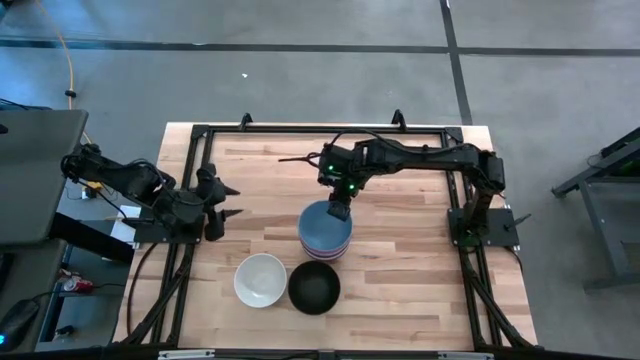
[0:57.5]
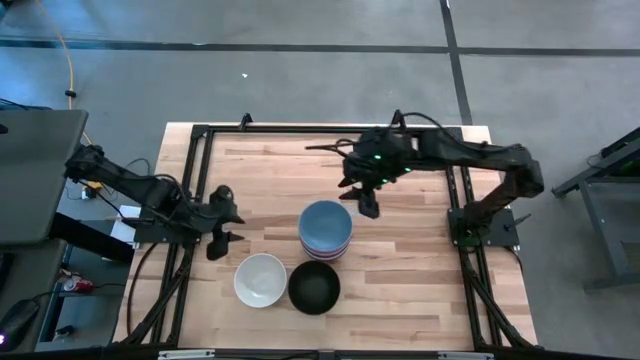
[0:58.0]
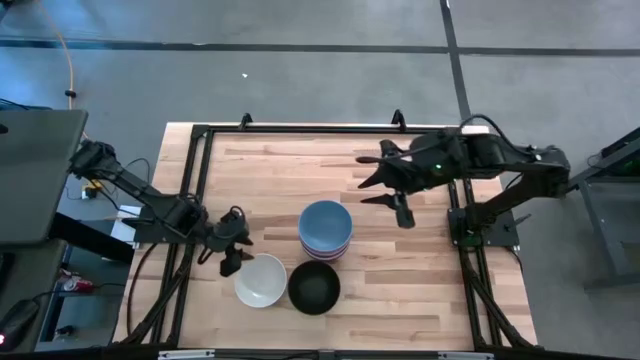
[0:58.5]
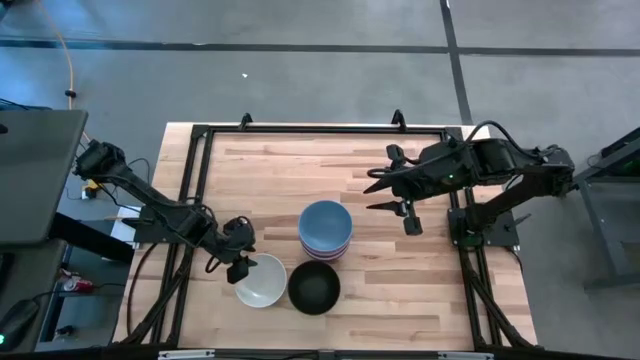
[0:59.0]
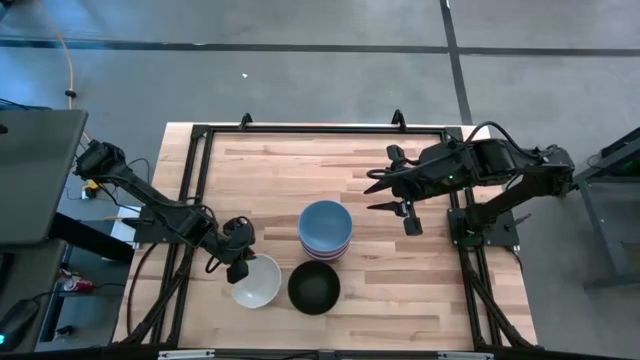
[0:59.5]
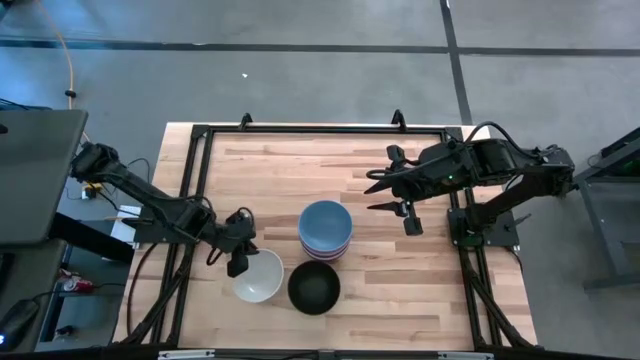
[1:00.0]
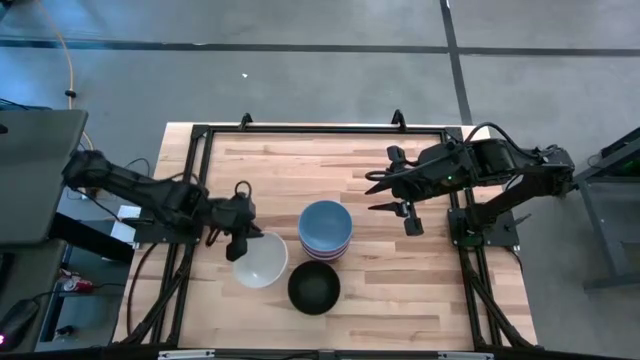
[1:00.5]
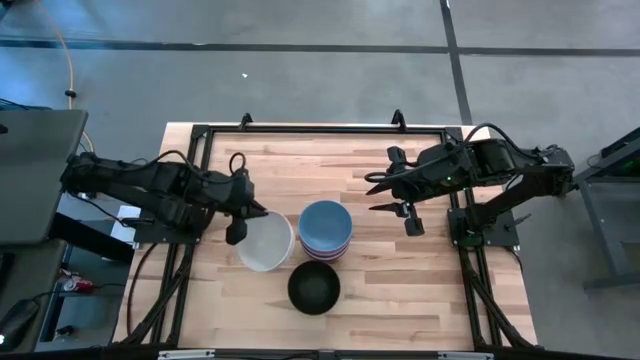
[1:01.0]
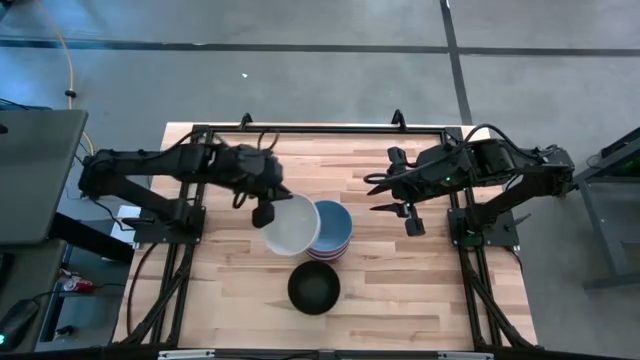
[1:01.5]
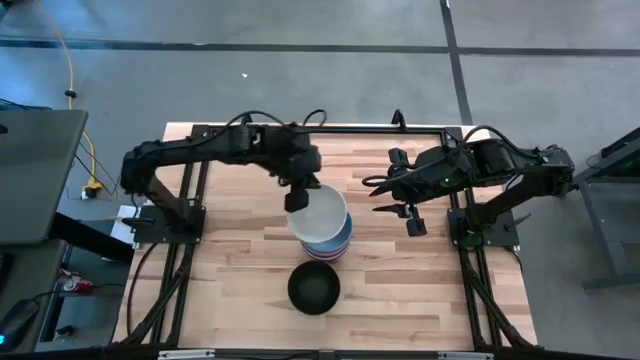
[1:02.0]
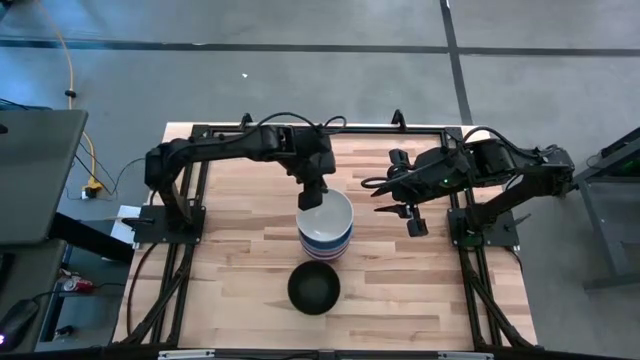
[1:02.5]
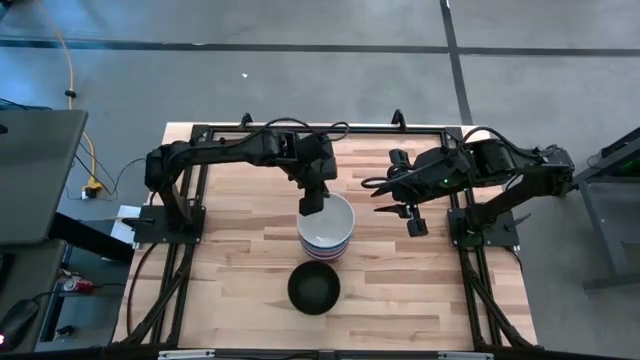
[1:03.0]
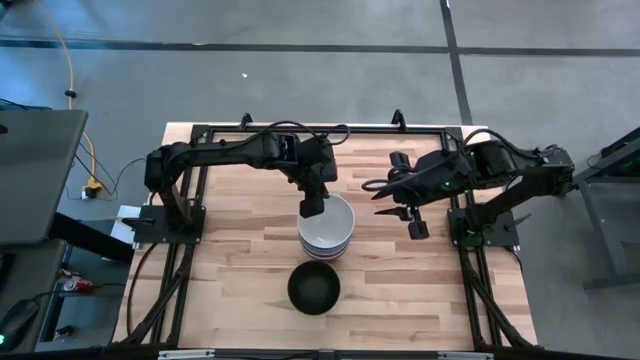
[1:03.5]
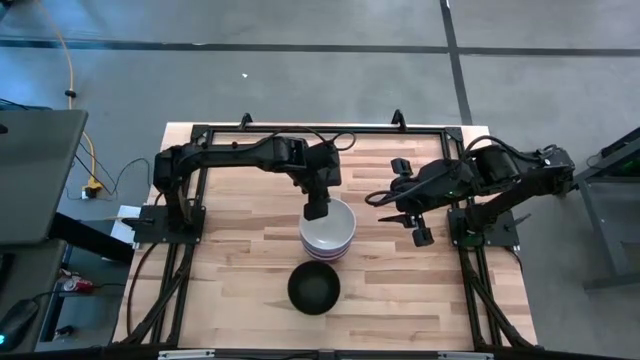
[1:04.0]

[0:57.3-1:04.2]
Task: Nest bowls inside each other
Stack the white bowl on top of the blue bowl

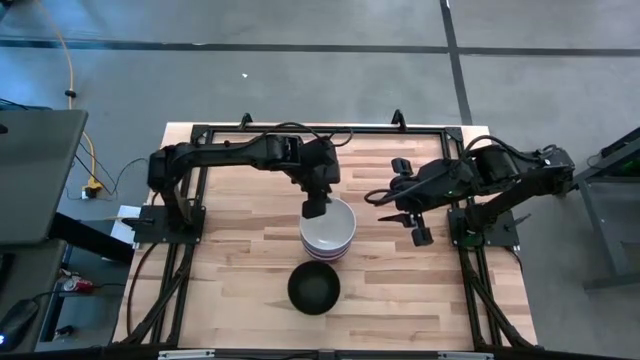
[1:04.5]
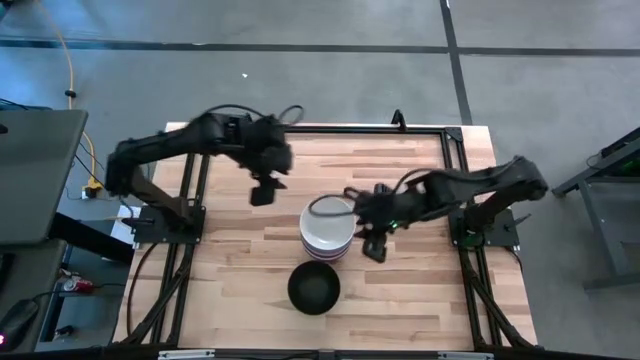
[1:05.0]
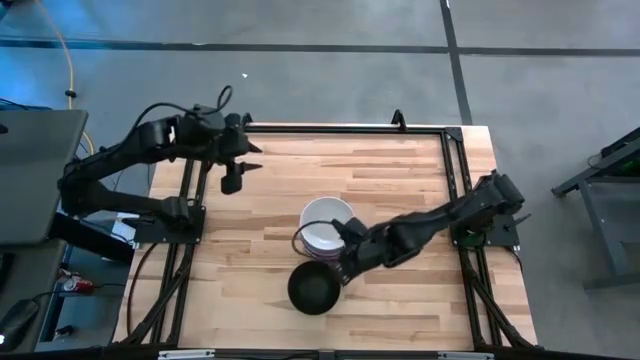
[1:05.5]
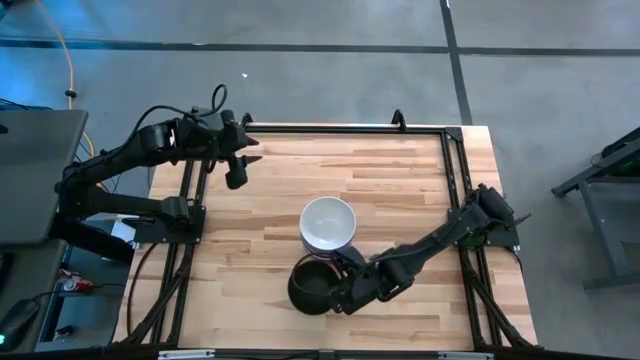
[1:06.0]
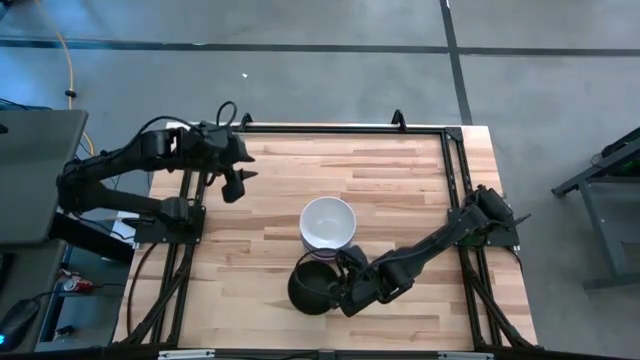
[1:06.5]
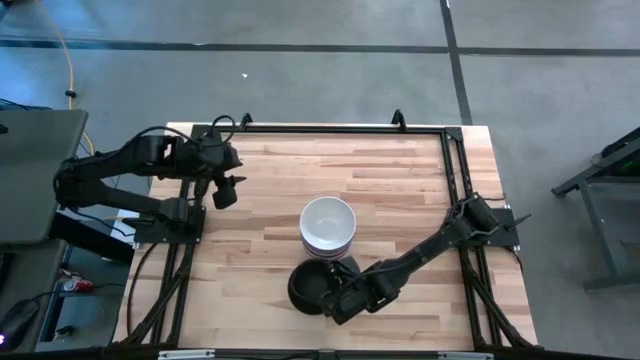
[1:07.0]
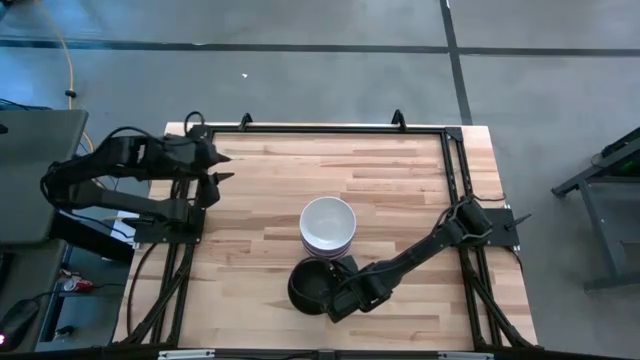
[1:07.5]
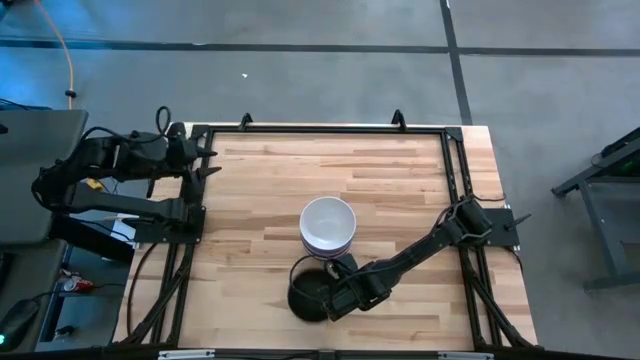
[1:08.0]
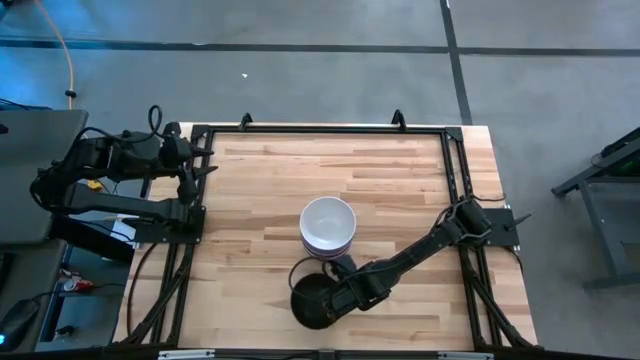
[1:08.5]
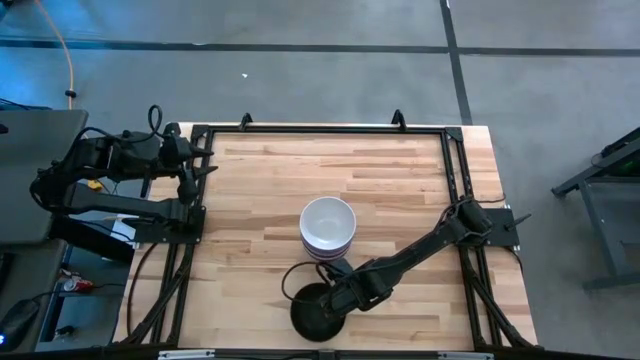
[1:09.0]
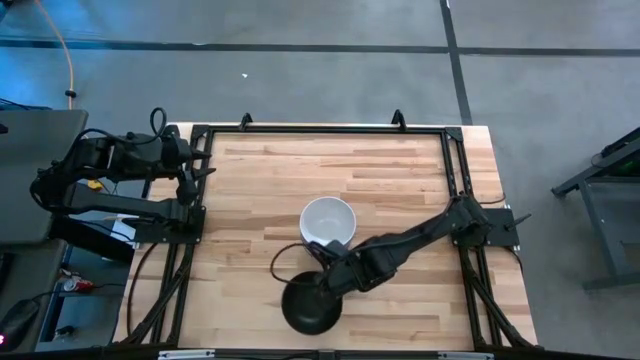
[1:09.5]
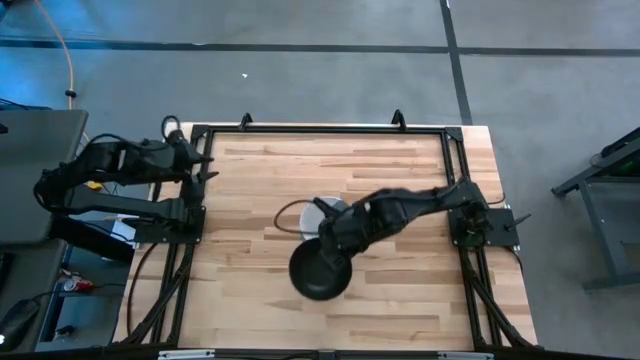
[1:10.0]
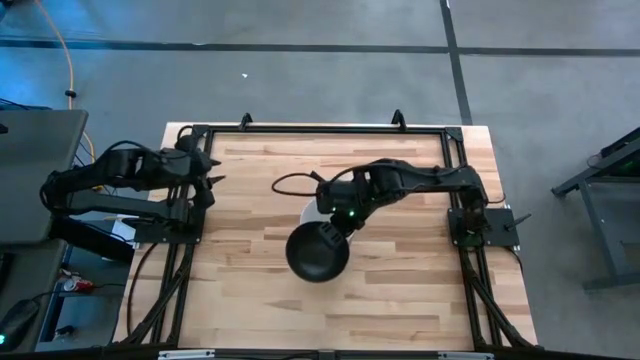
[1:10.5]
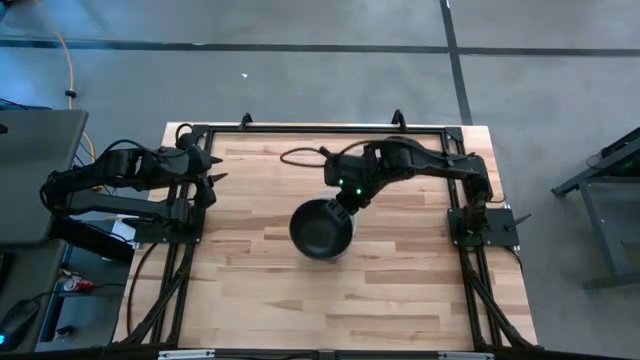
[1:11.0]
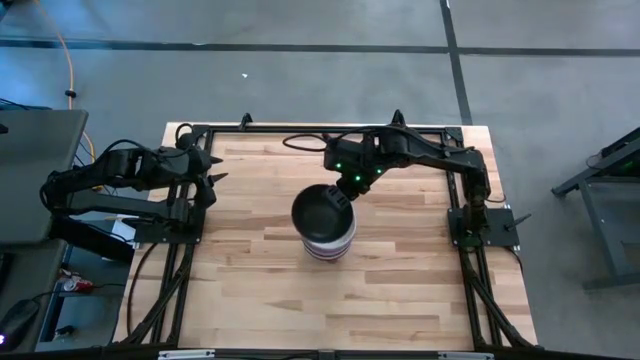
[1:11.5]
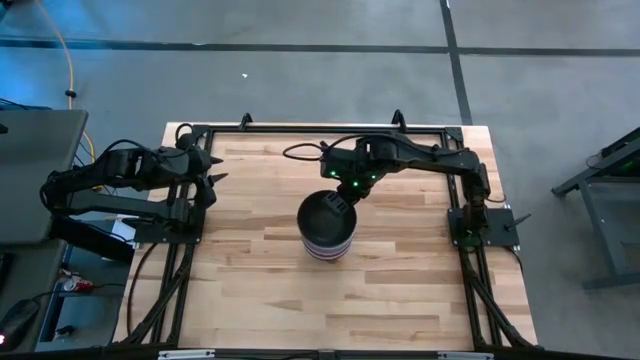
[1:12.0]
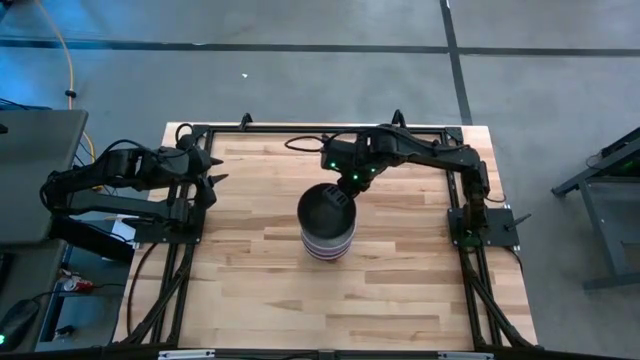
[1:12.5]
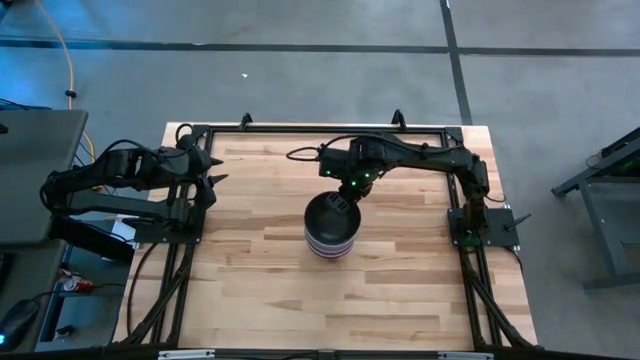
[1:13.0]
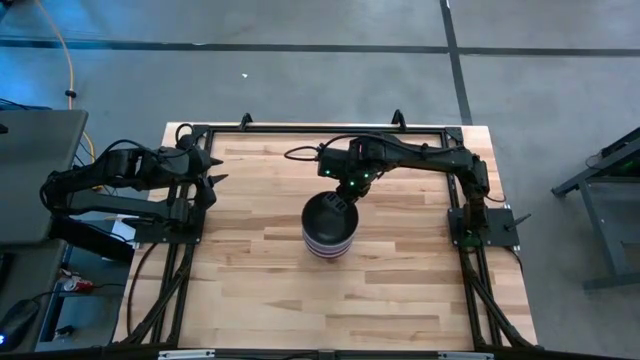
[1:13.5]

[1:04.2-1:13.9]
Stack the black bowl on top of the white bowl

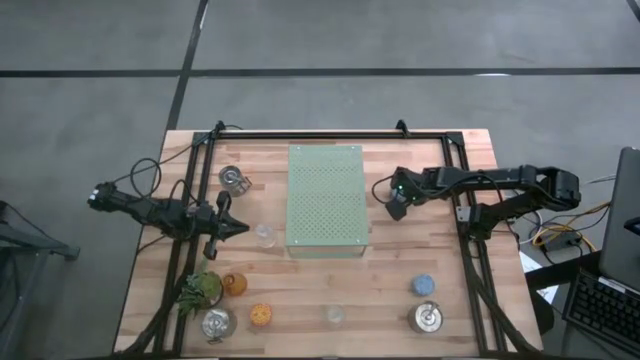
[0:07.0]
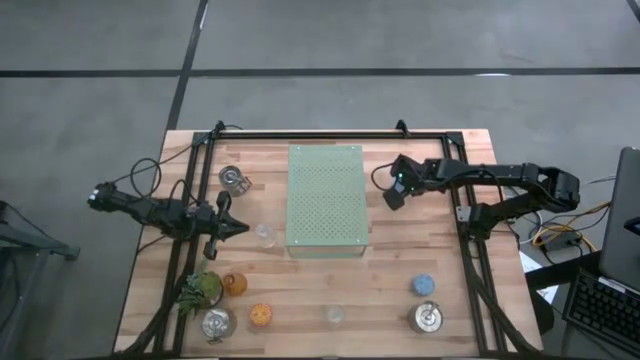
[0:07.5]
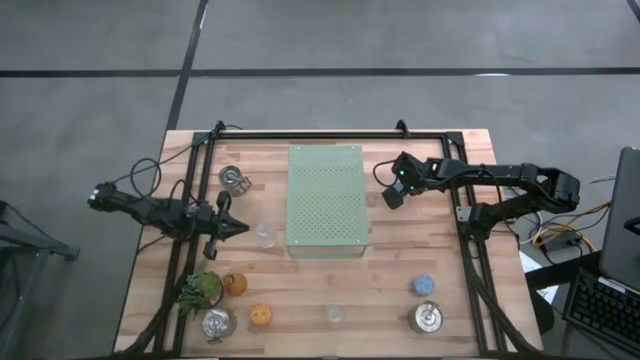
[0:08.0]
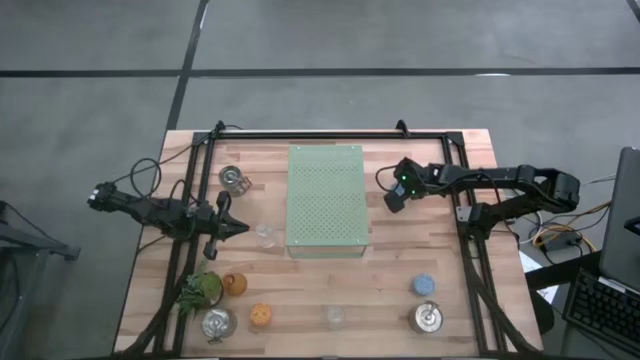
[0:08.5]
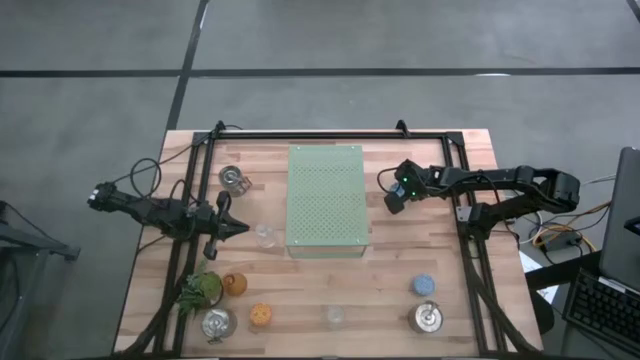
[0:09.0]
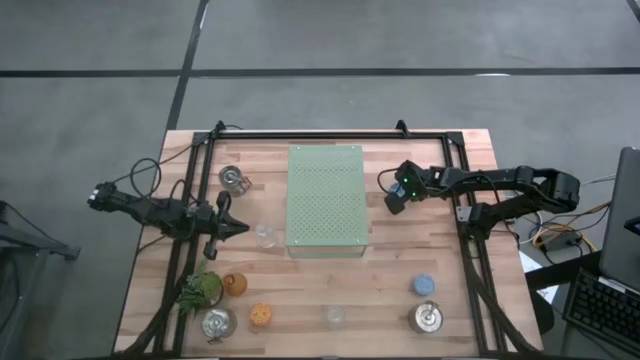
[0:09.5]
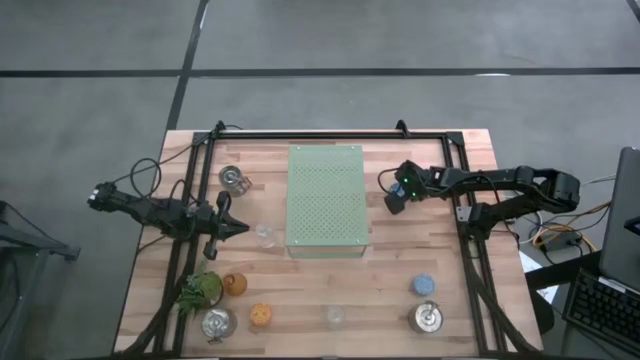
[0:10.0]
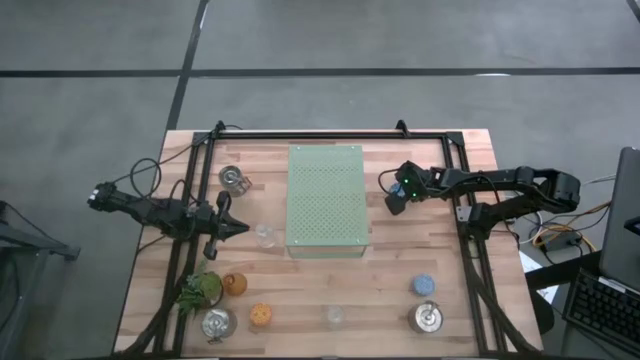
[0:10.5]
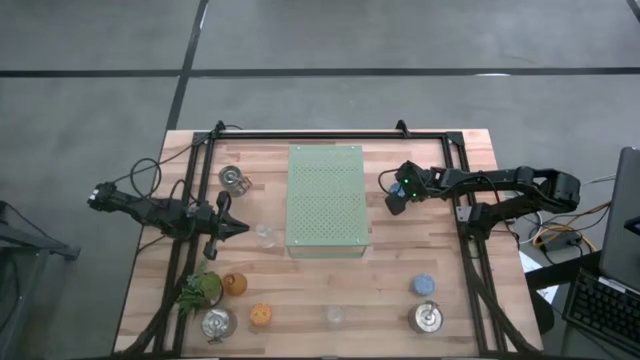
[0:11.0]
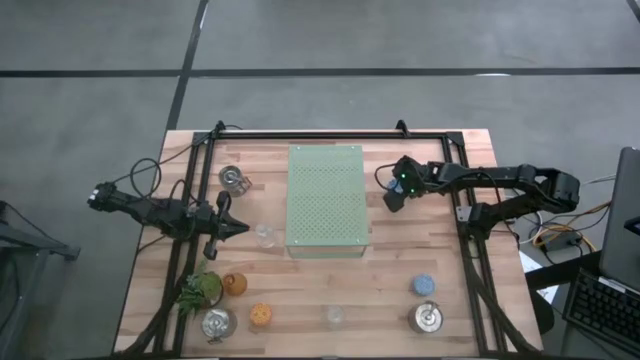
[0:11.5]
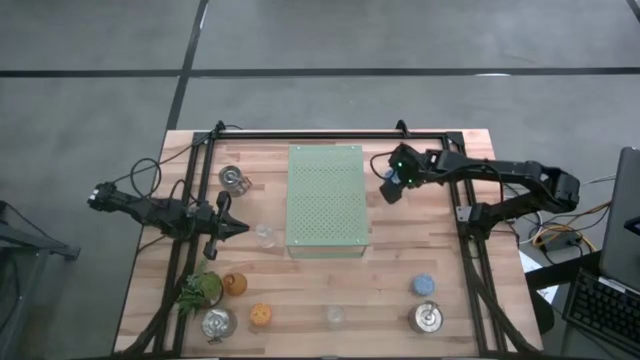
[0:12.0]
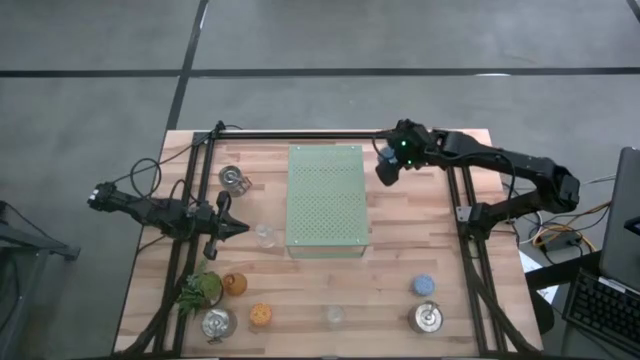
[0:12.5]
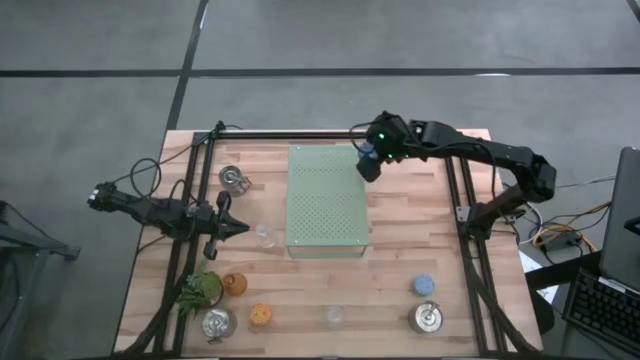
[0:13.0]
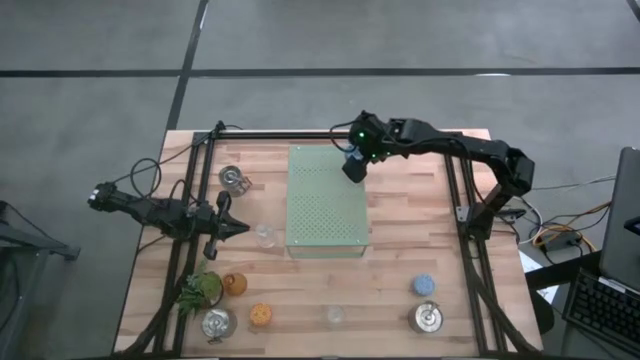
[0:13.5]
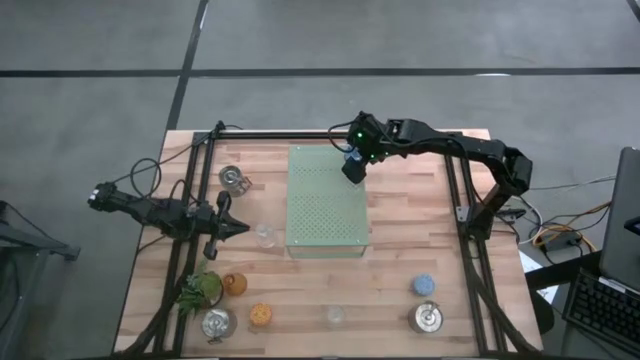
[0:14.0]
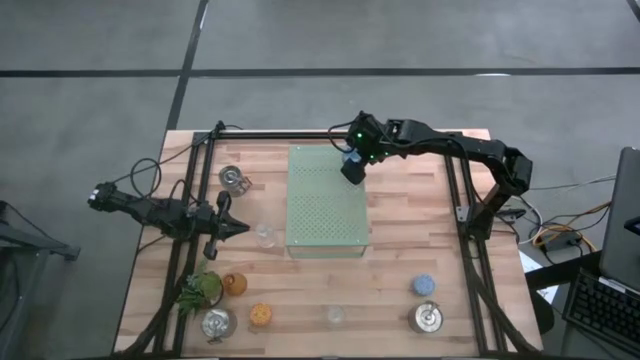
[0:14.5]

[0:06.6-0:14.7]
Task: Pick & Place candle stick holders
Put the blue patterned scented candle on the shelf
